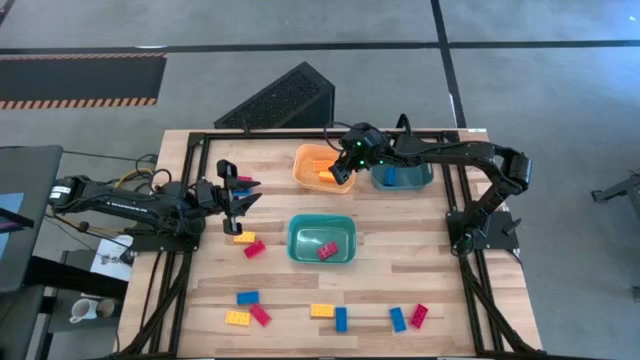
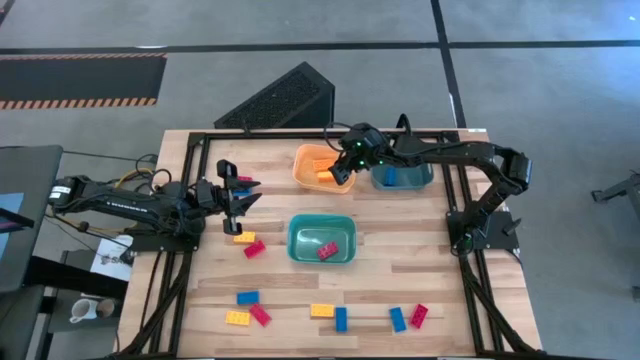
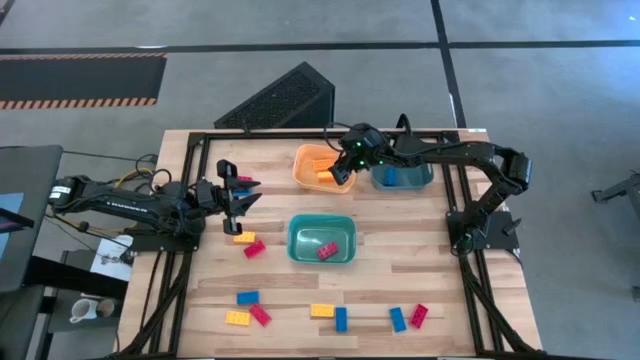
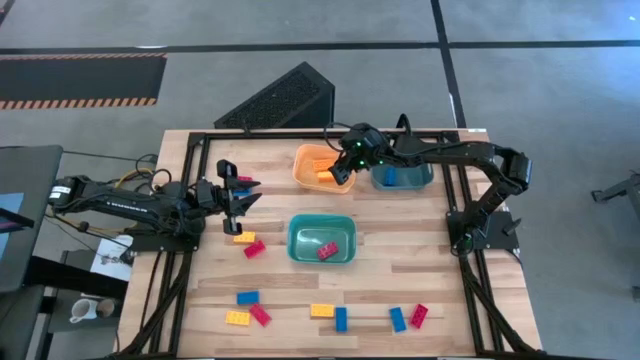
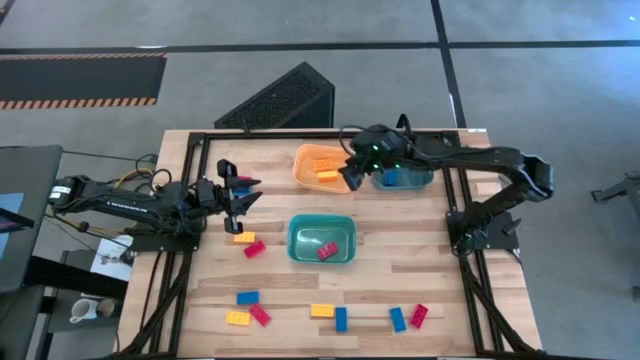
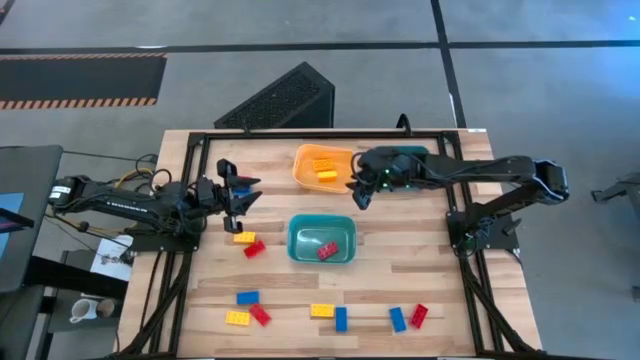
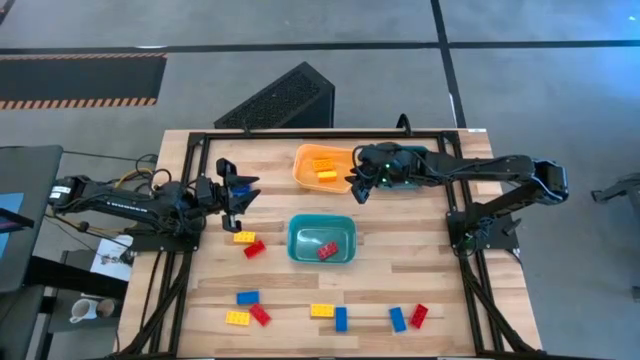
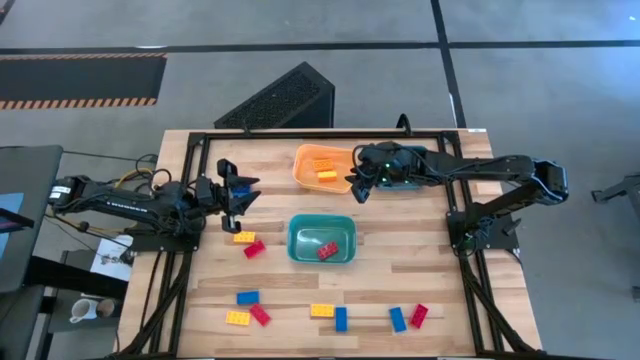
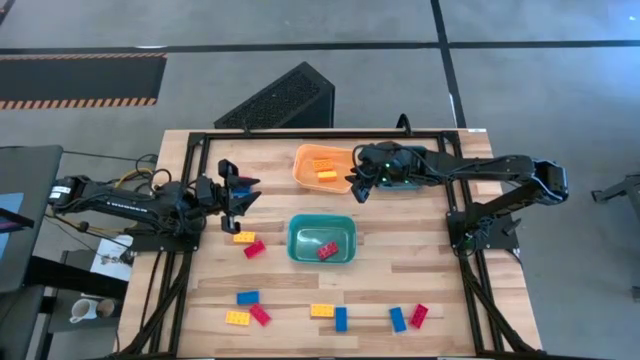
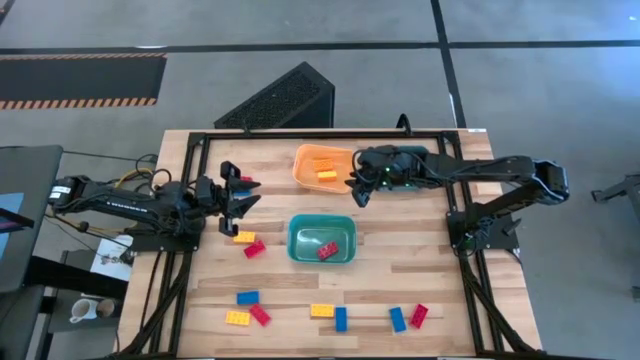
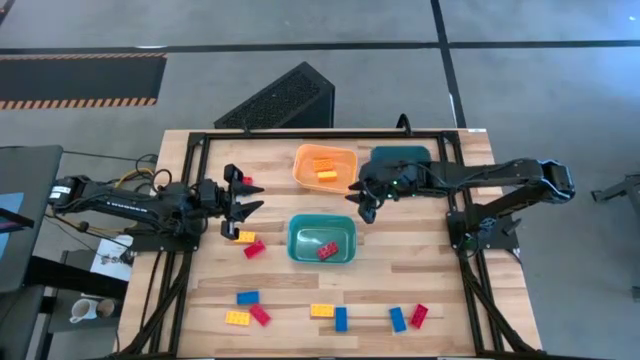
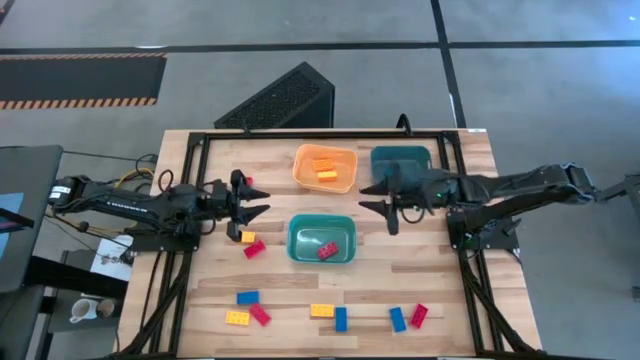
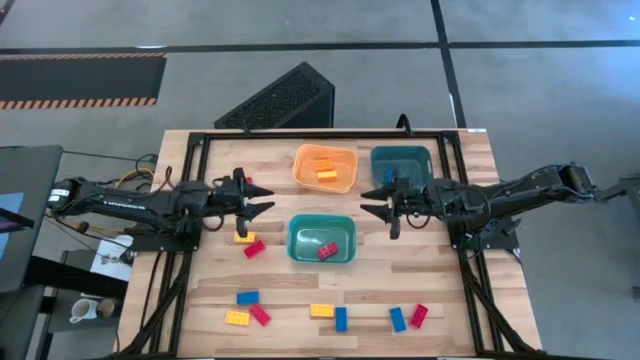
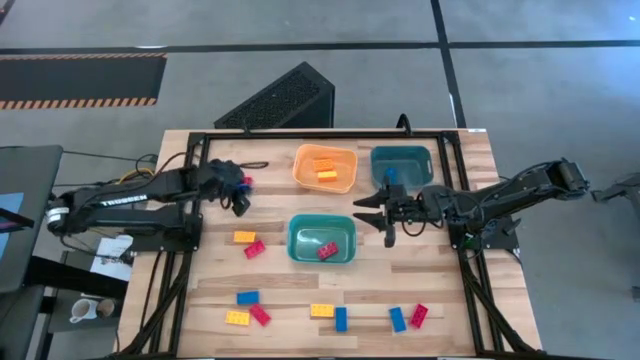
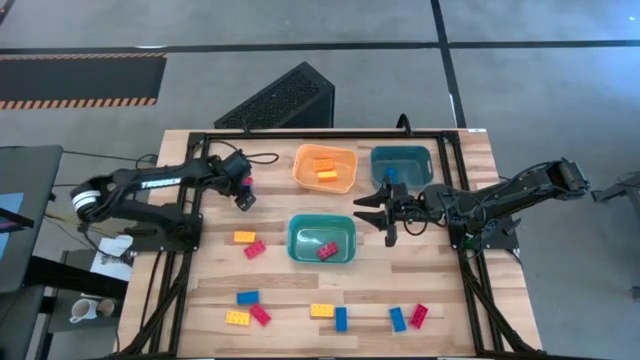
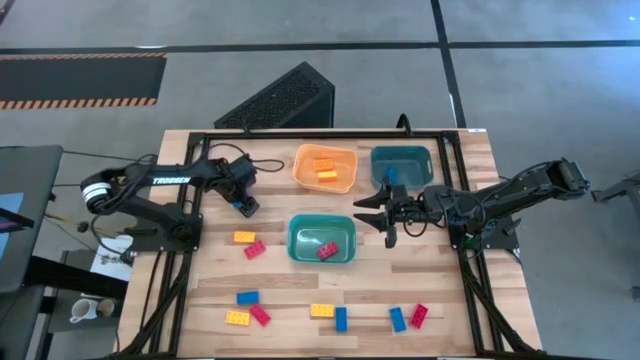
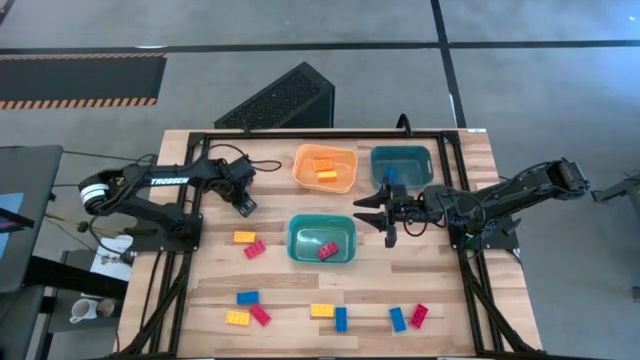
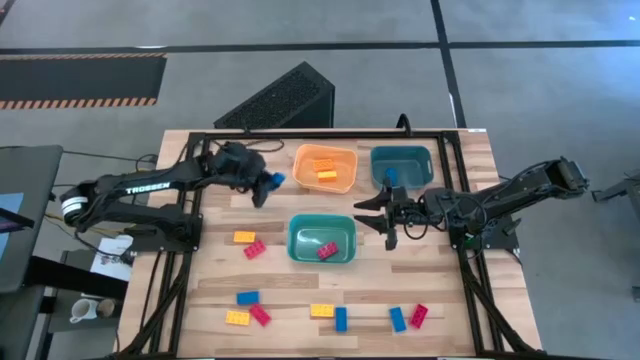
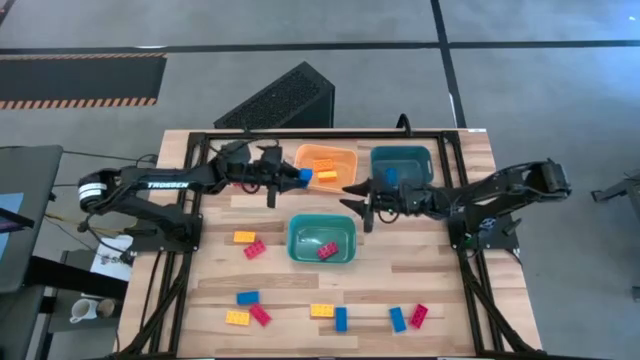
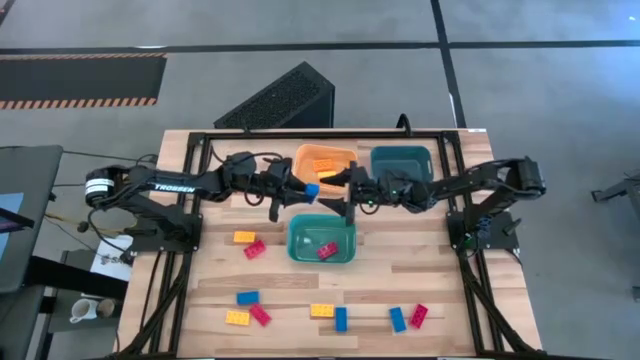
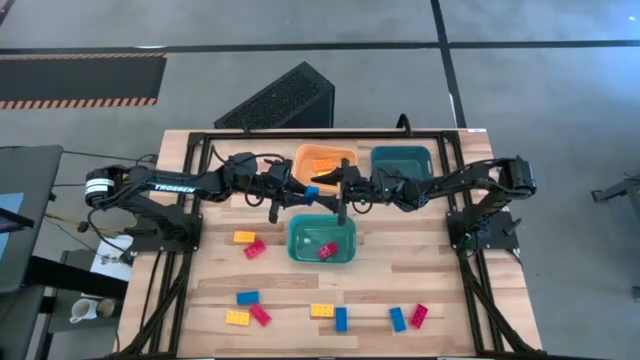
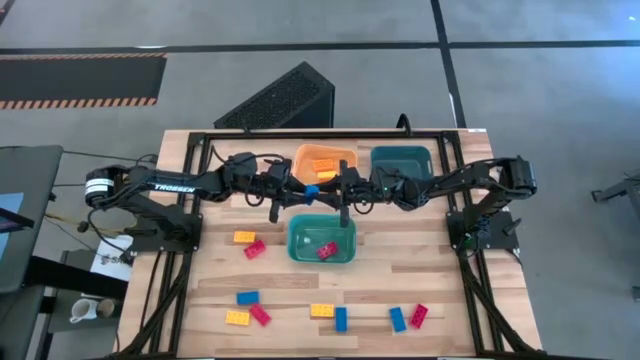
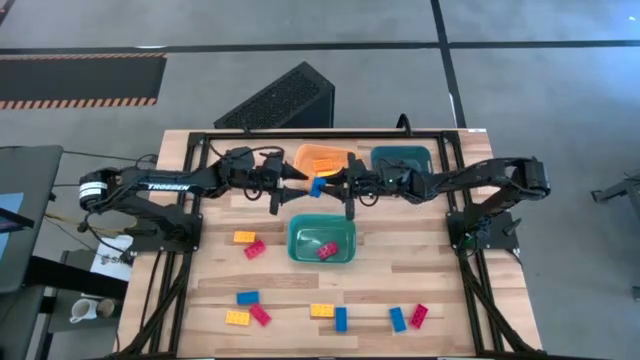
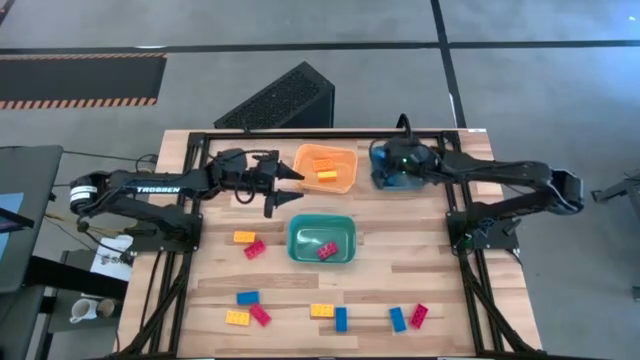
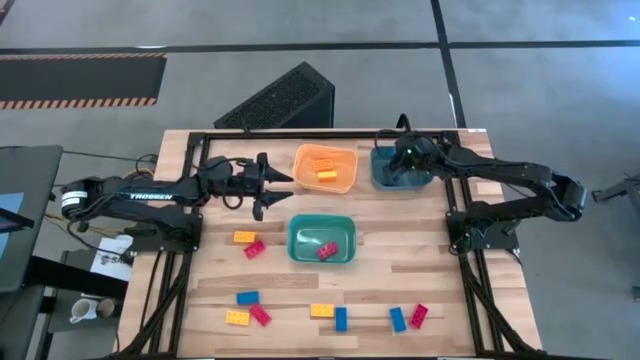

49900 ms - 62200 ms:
Task: Sort & place blocks by color
Put the blue game piece into the blue bin

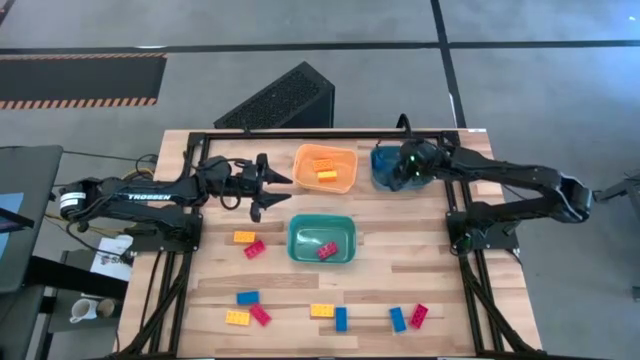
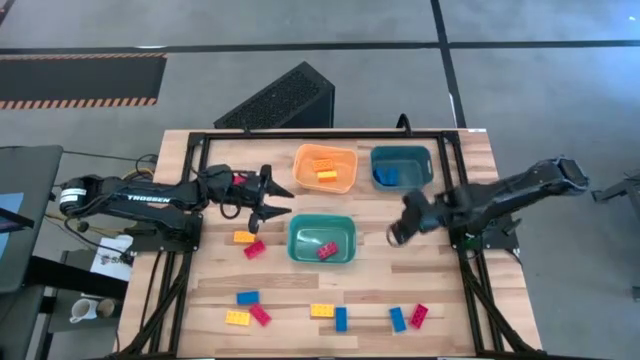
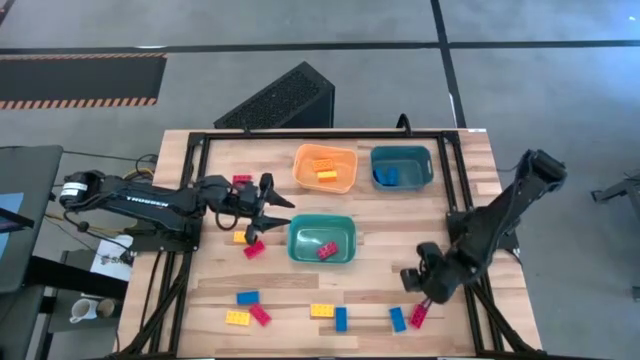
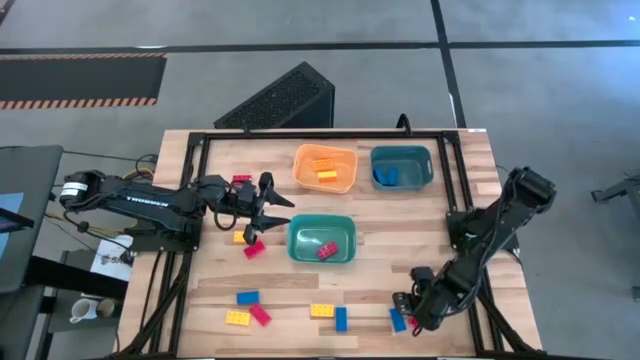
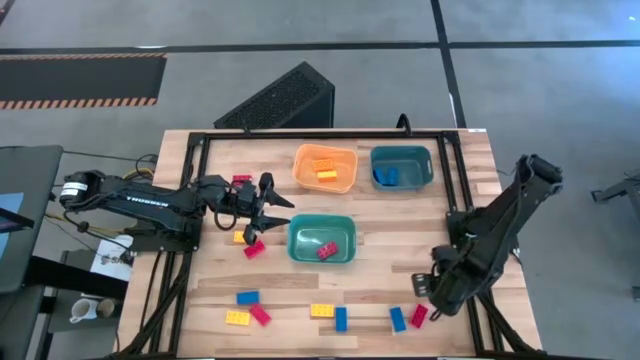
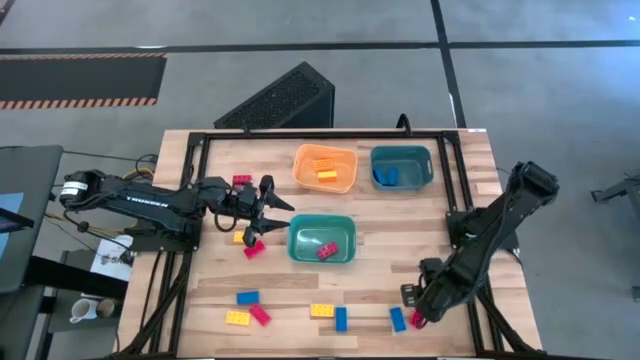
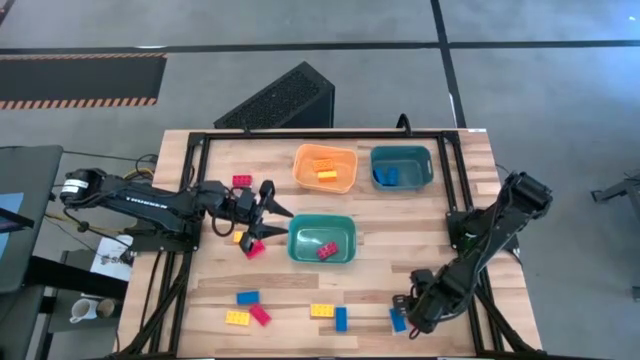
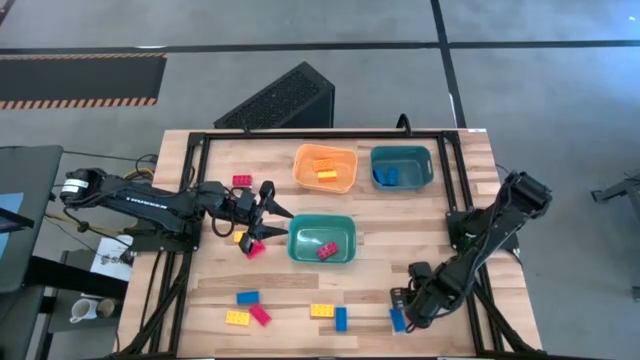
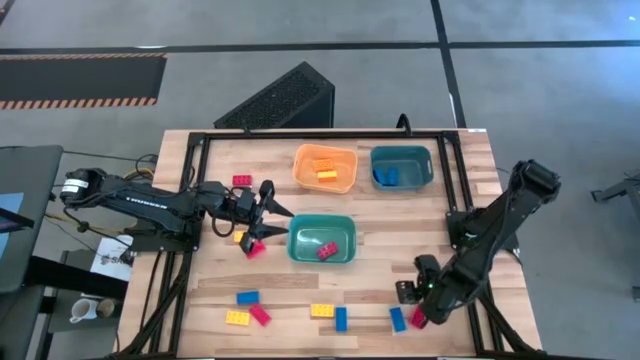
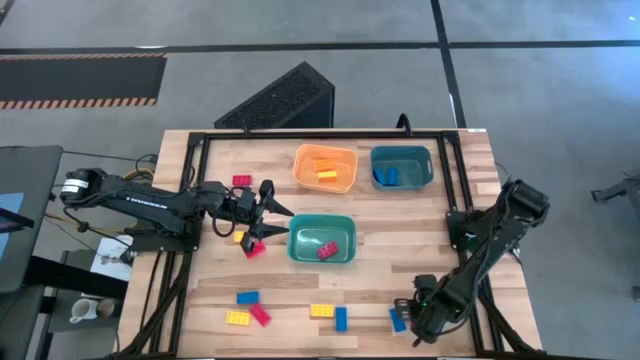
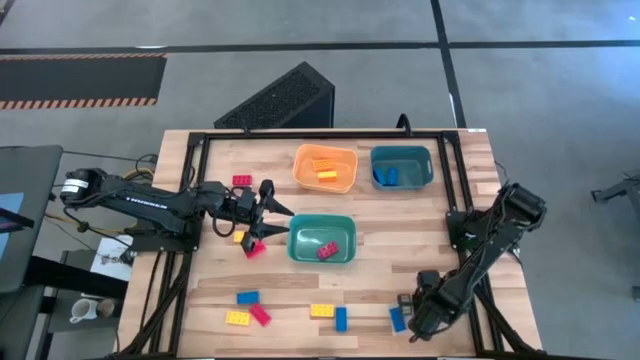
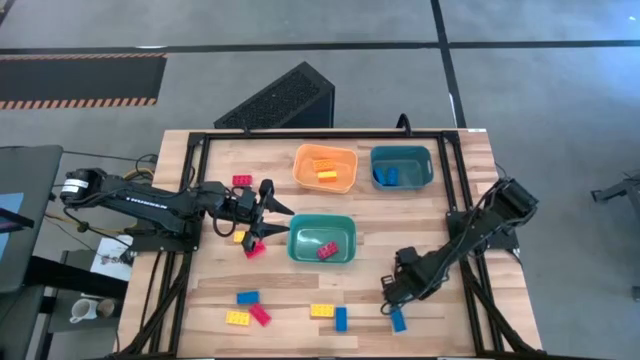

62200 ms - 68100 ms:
Put the red game piece into the green bin

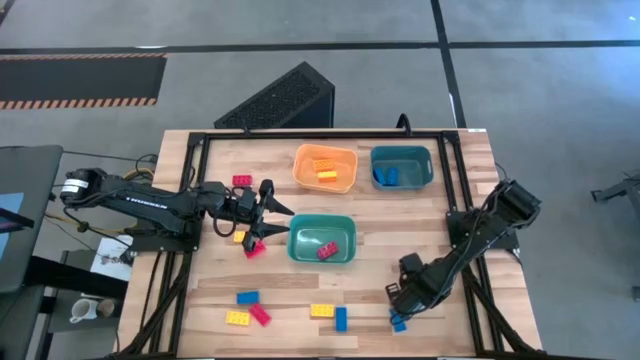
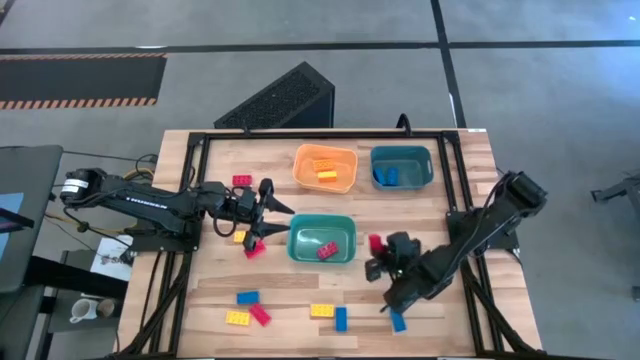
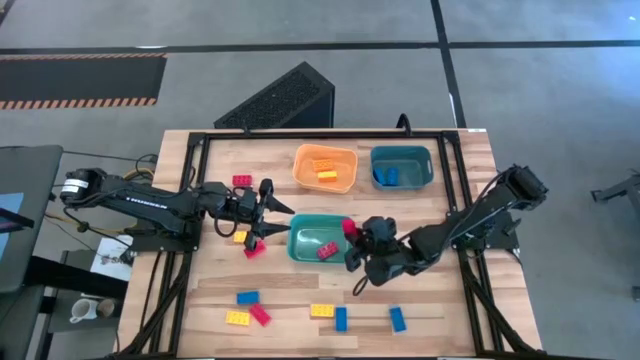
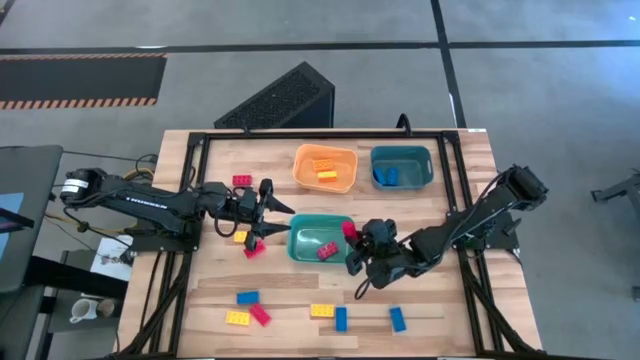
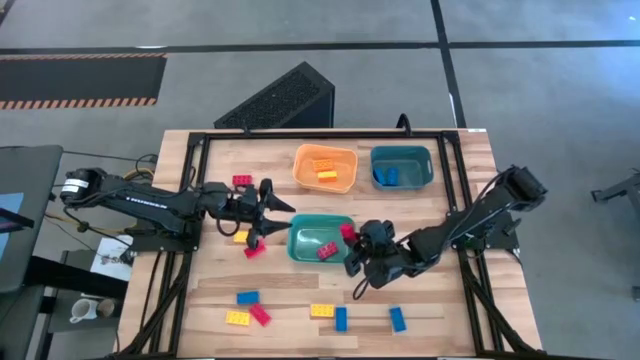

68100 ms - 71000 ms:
Put the red game piece into the green bin
